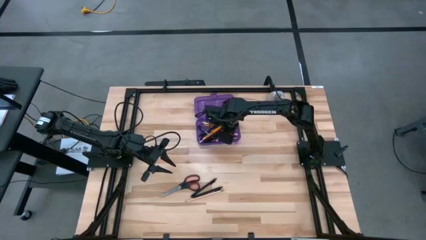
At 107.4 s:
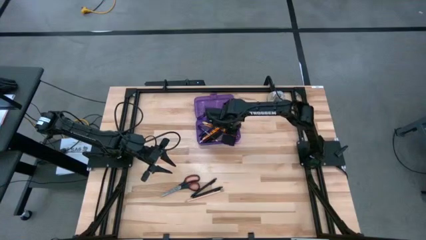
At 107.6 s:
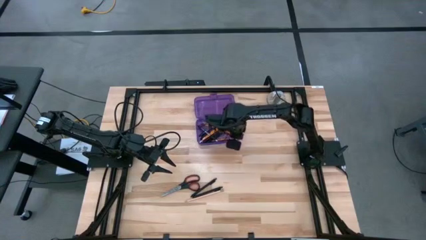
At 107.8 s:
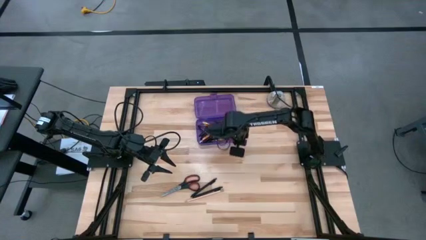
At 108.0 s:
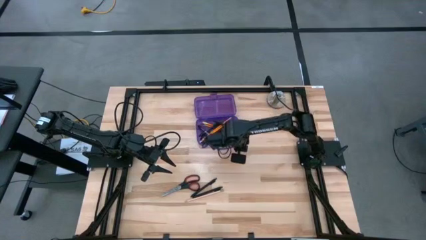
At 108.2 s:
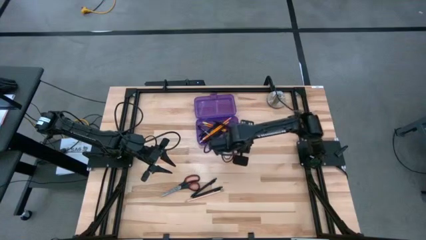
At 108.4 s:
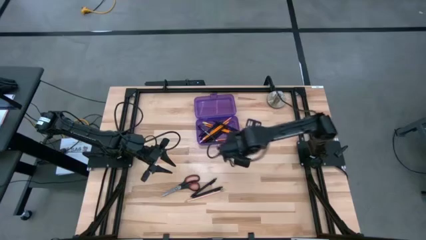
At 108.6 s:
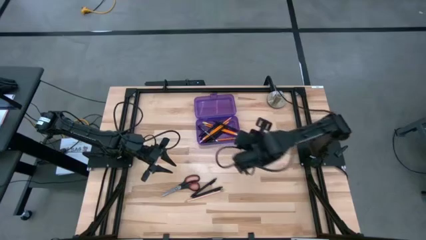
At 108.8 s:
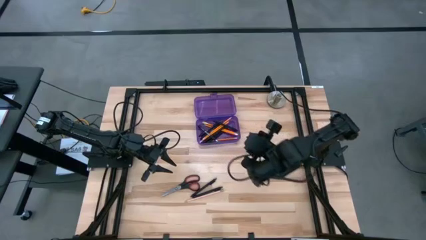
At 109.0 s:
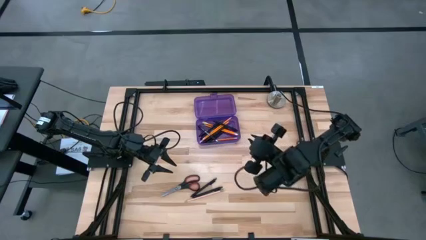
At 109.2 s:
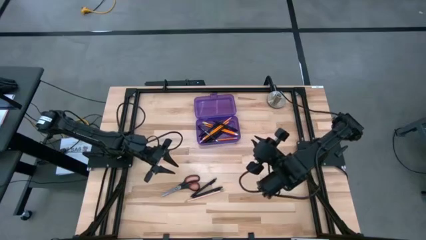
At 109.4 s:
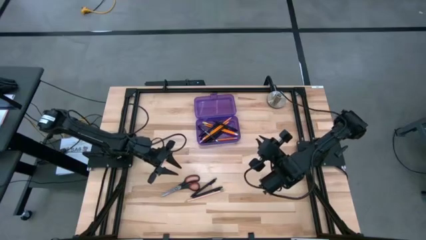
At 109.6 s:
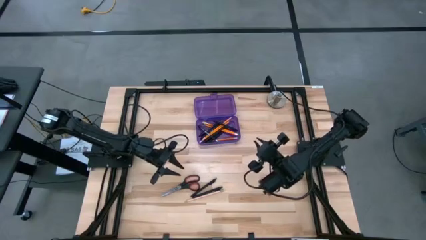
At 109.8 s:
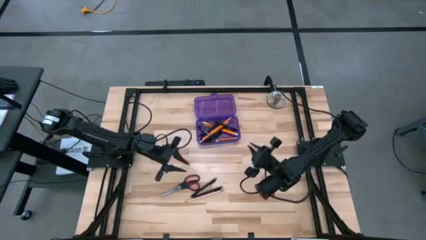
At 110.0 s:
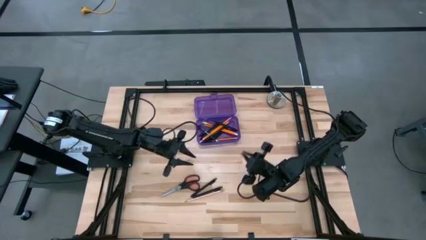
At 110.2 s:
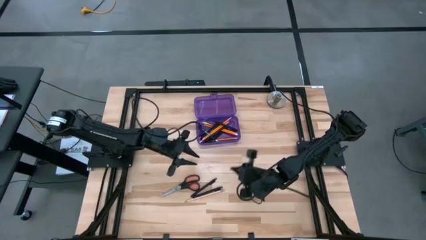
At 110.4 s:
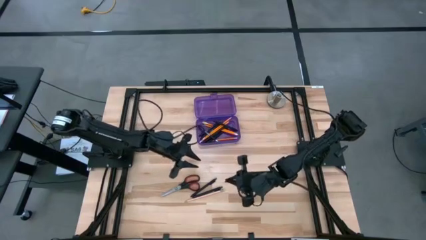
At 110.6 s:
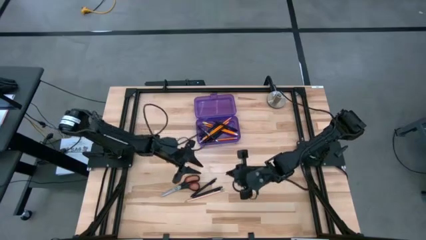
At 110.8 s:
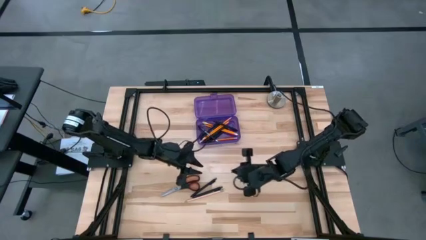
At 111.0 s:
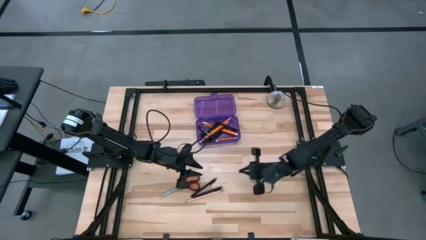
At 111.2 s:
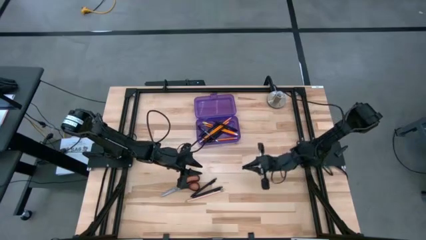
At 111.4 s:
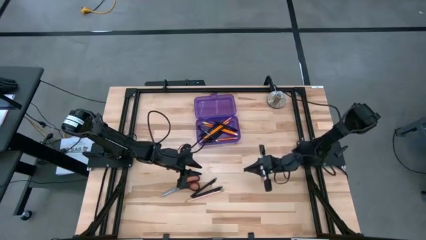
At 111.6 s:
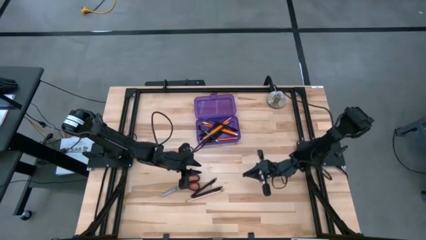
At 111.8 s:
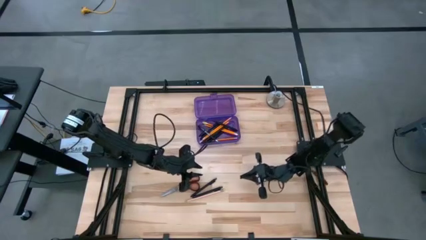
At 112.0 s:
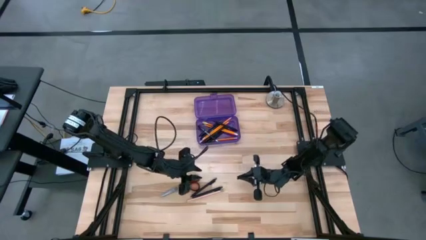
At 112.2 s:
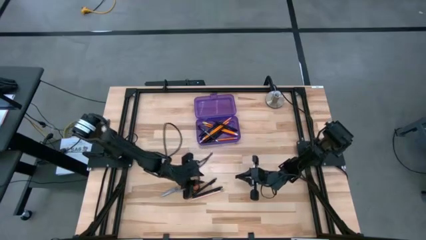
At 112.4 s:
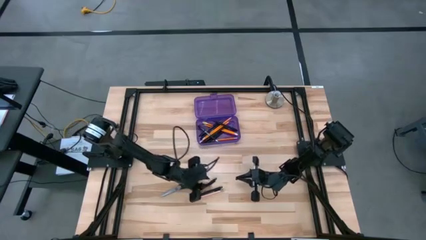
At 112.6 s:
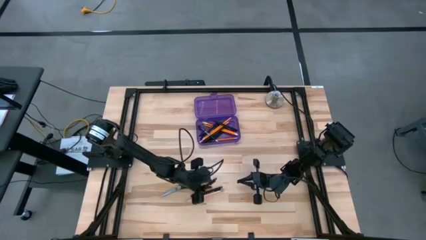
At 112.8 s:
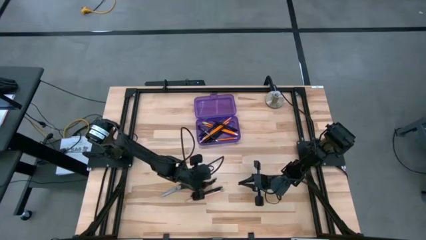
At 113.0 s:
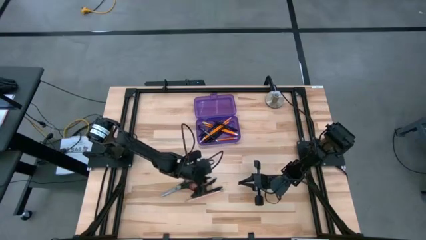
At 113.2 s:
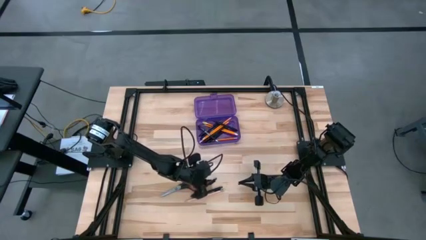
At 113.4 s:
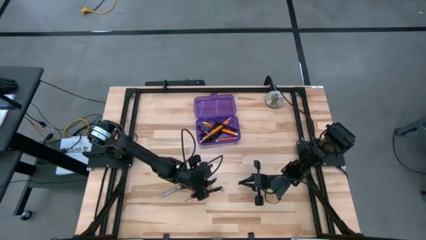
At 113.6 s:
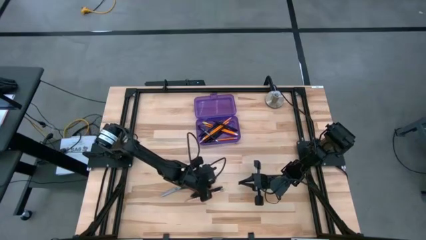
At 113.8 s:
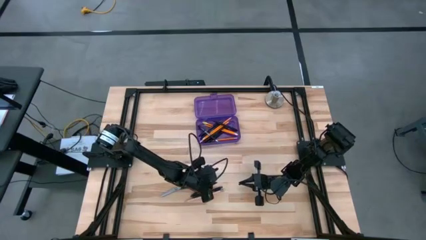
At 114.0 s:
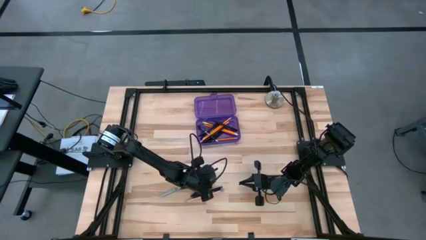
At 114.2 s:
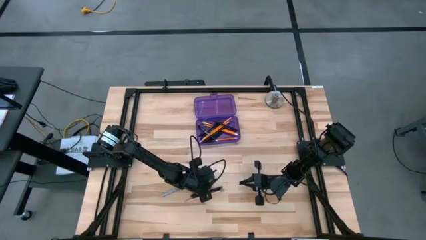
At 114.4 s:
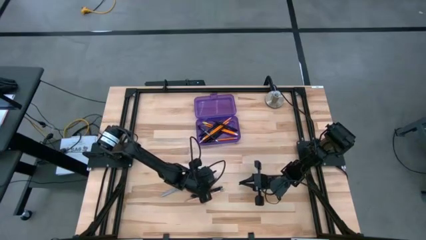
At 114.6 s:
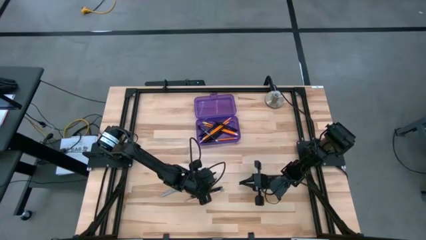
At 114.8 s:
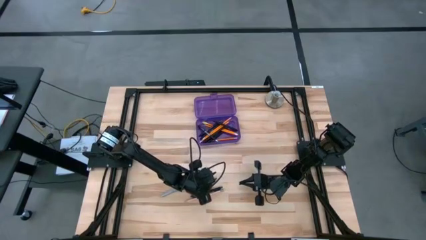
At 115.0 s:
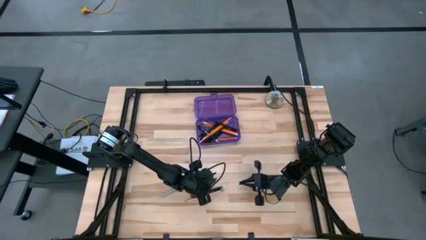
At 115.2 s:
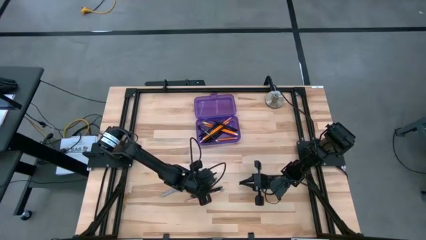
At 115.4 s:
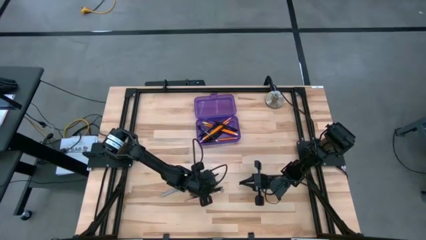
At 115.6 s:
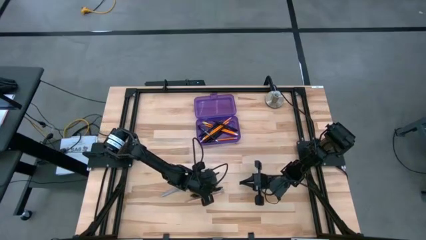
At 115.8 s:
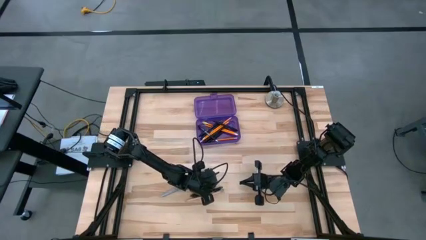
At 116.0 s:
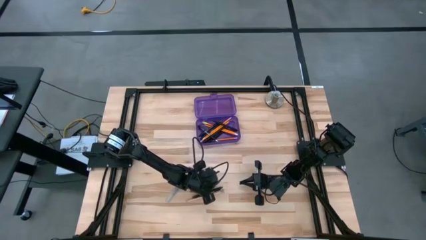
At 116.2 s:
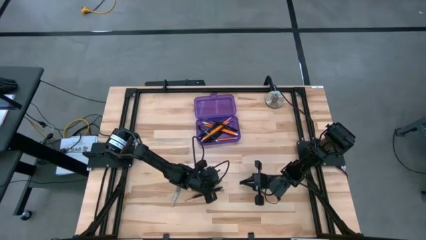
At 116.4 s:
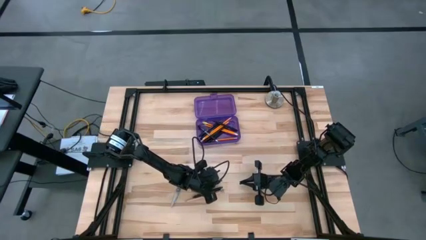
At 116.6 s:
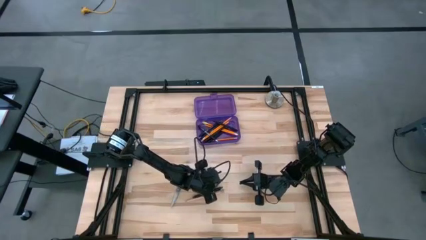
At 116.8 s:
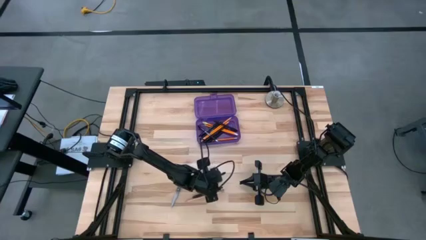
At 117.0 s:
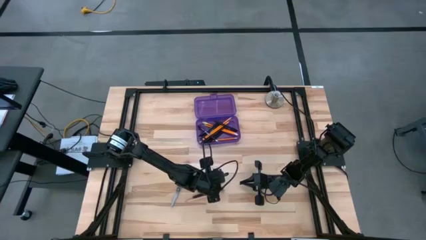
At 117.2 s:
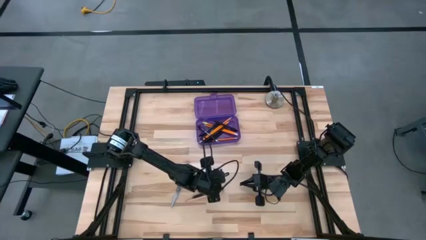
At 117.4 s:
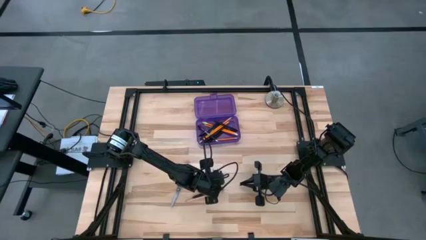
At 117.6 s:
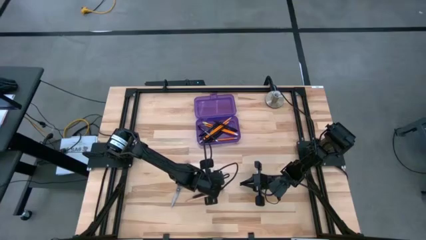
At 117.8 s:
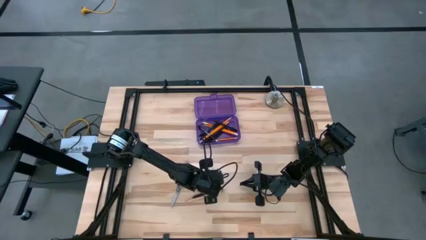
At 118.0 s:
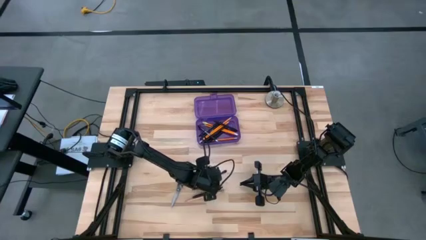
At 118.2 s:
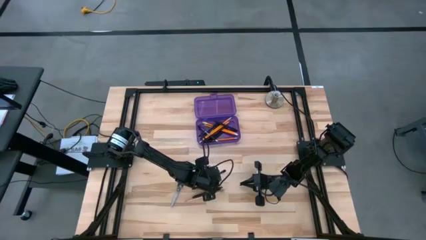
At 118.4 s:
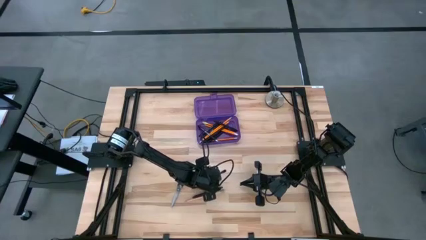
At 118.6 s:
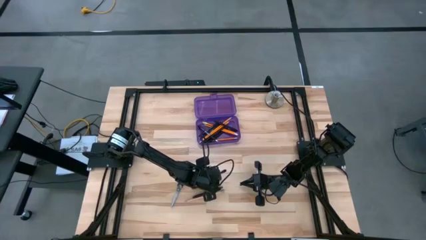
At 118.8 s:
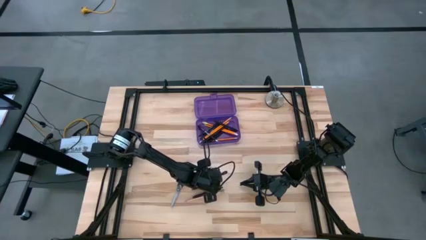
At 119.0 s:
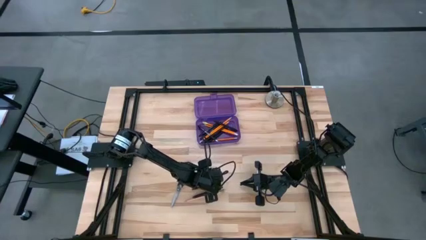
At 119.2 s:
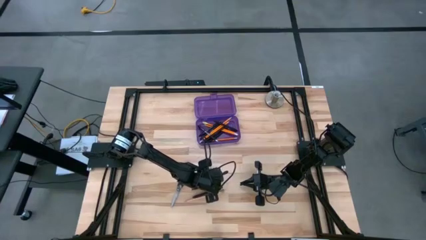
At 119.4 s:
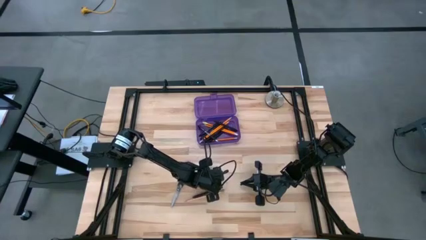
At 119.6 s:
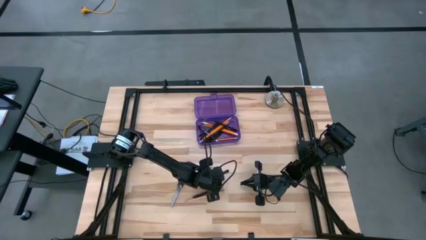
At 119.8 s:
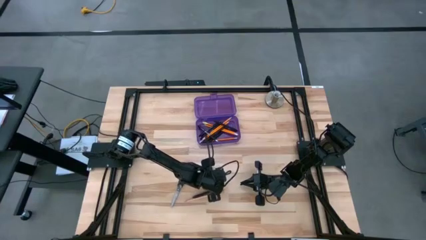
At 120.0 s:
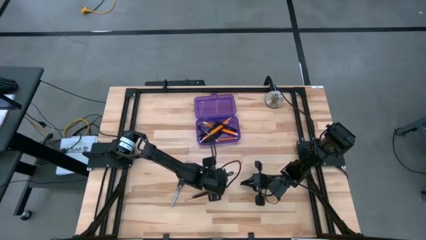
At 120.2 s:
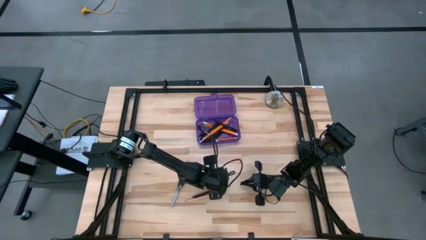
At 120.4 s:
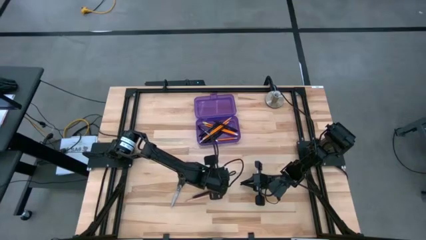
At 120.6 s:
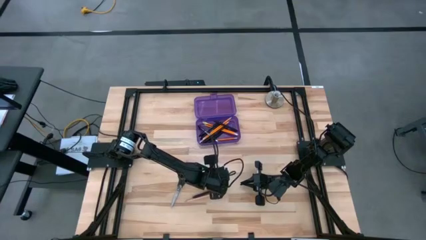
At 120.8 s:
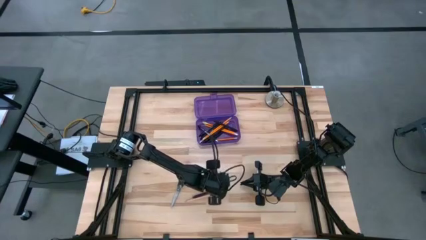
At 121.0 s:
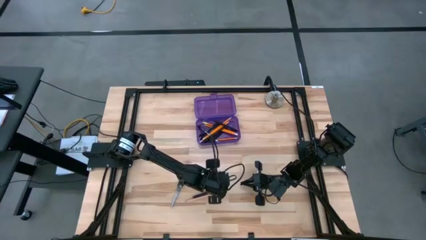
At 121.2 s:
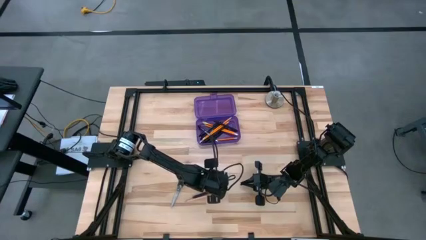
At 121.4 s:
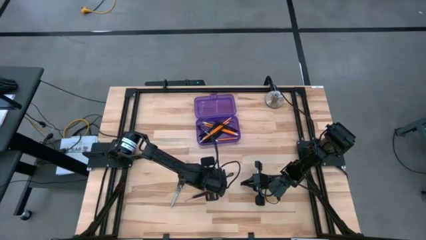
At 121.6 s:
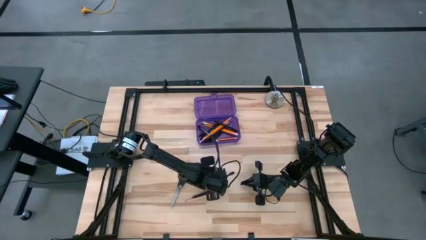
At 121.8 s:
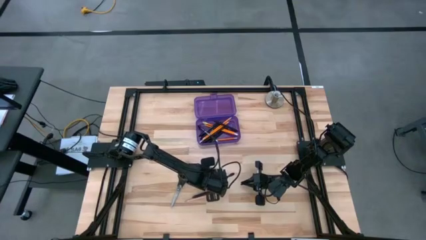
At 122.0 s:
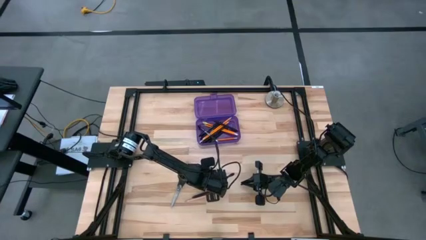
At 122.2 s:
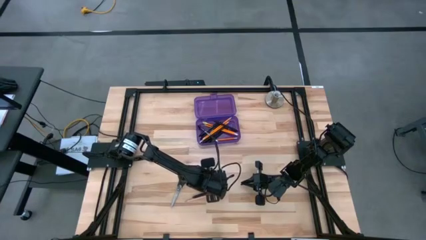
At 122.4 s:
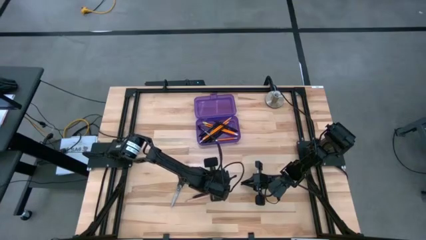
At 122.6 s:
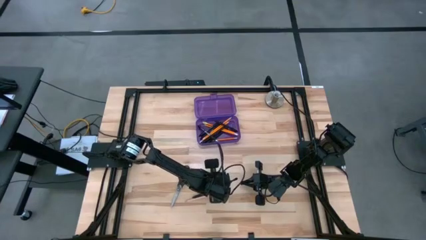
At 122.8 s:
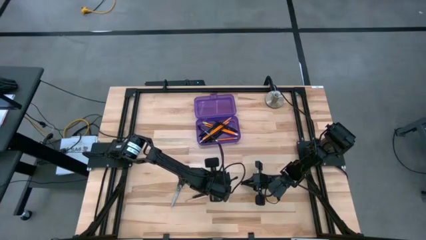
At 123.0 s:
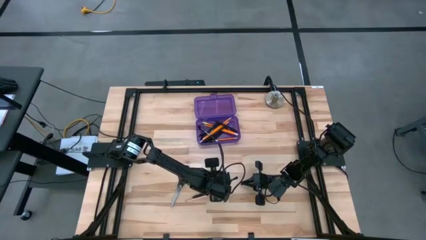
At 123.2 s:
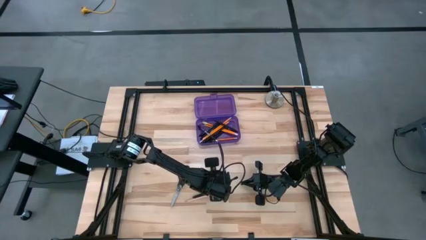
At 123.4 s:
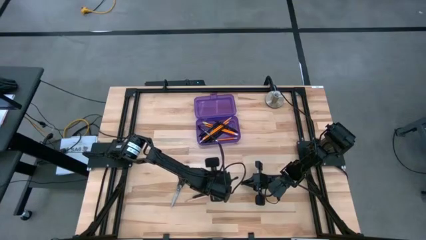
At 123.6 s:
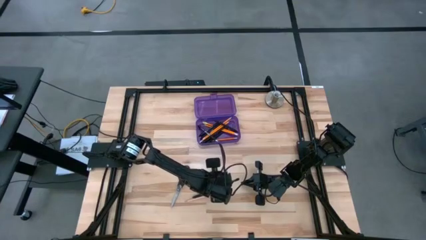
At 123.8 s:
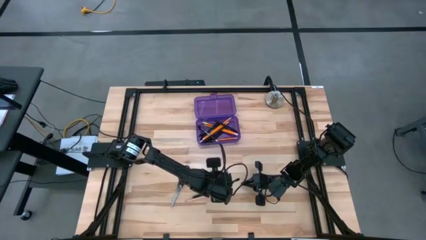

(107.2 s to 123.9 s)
Task: Pick & place school supplies into a supply box
Put the black pen into the purple supply box
